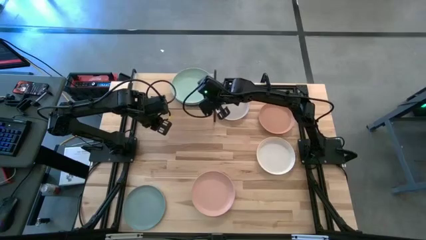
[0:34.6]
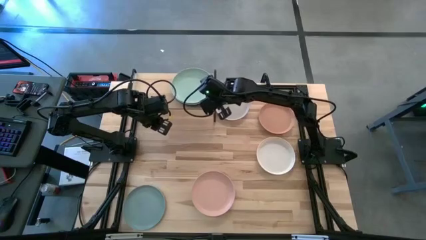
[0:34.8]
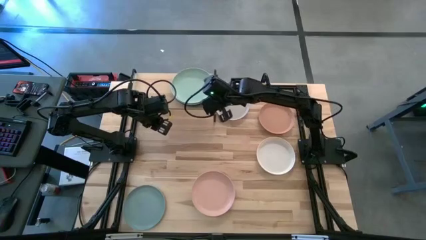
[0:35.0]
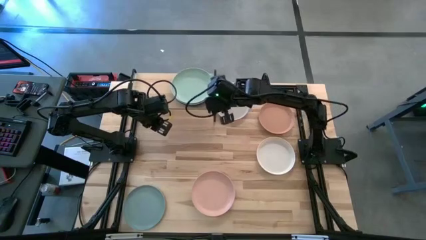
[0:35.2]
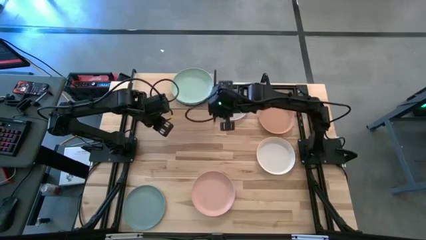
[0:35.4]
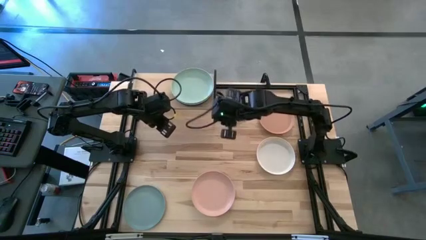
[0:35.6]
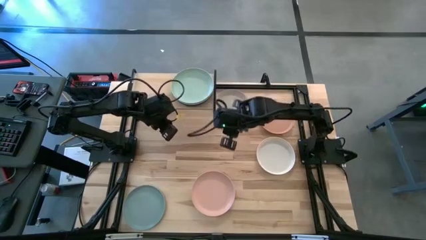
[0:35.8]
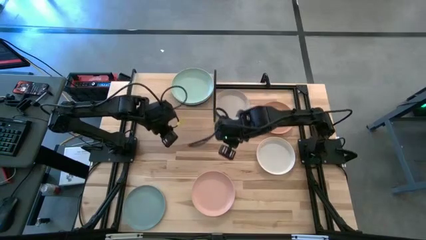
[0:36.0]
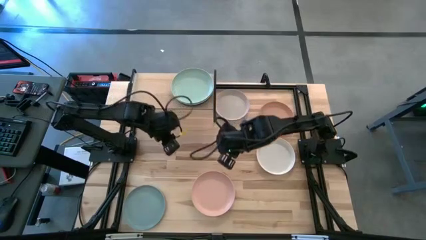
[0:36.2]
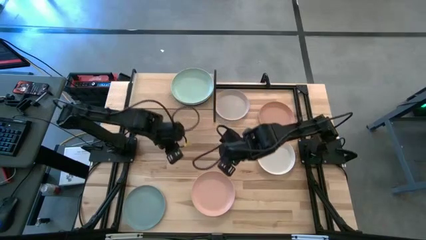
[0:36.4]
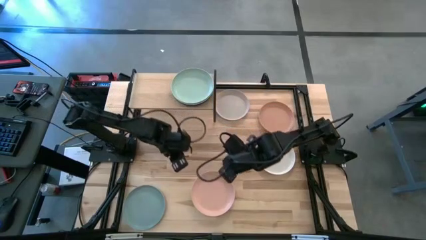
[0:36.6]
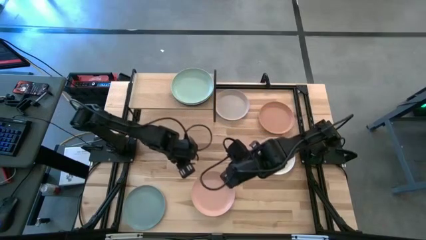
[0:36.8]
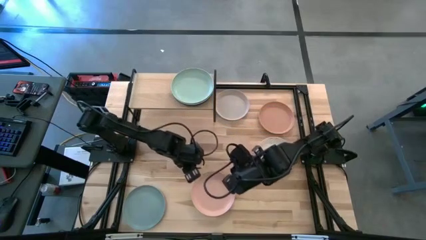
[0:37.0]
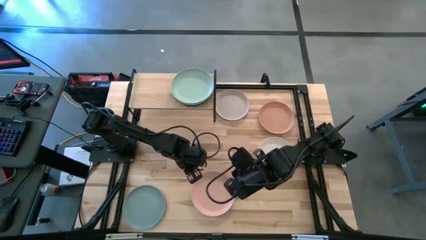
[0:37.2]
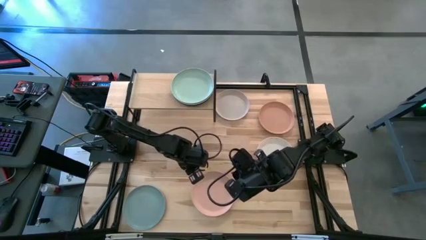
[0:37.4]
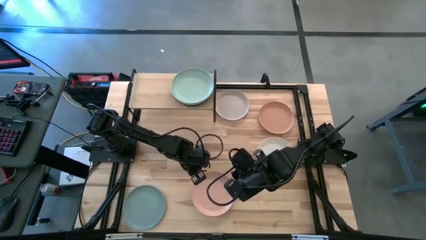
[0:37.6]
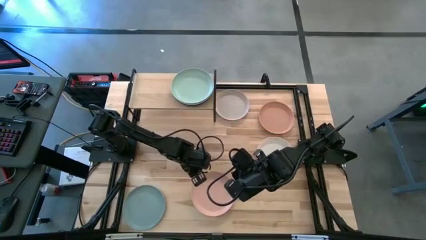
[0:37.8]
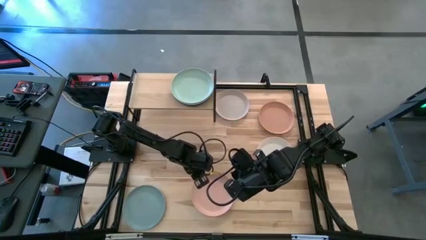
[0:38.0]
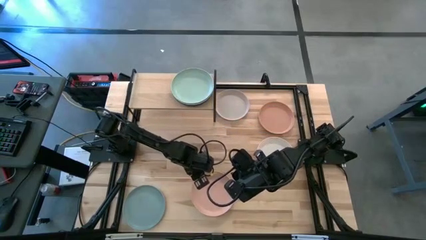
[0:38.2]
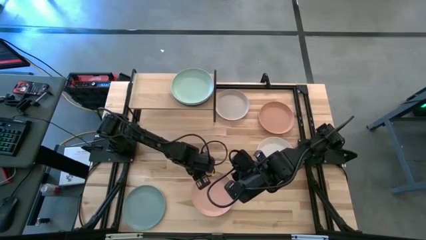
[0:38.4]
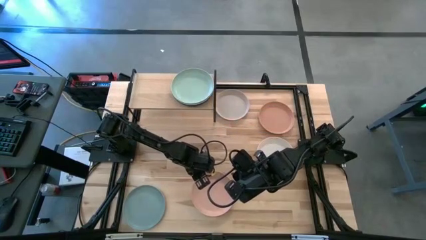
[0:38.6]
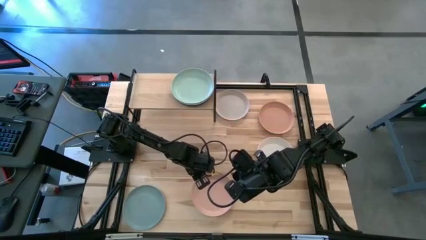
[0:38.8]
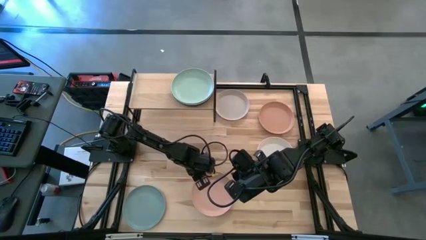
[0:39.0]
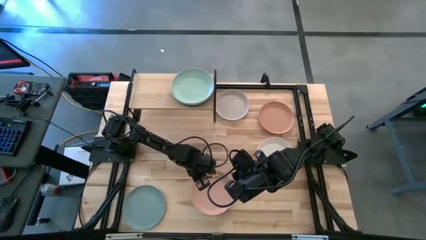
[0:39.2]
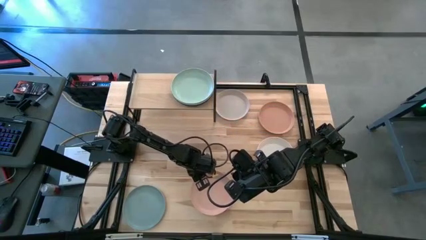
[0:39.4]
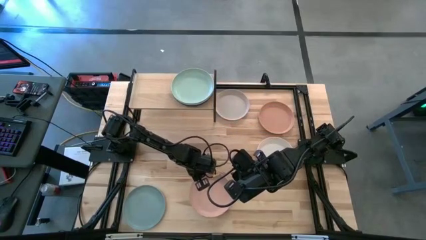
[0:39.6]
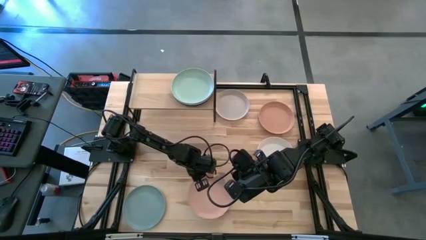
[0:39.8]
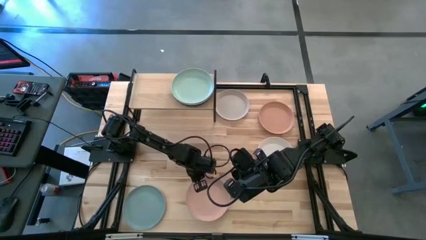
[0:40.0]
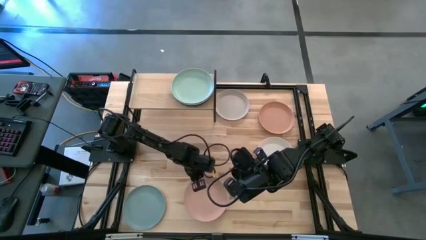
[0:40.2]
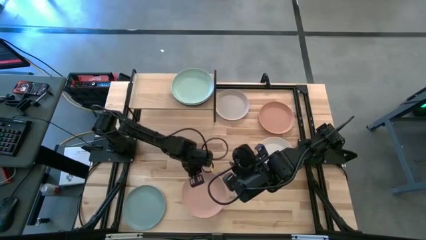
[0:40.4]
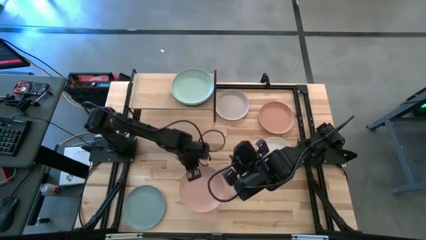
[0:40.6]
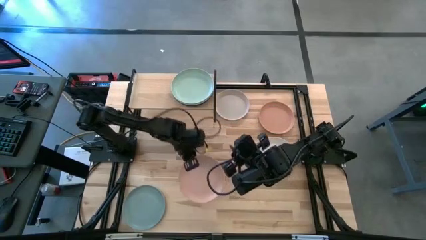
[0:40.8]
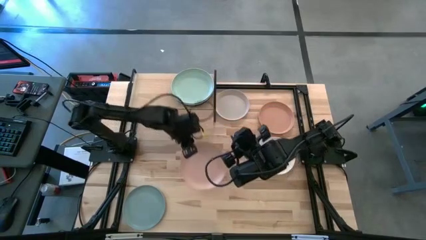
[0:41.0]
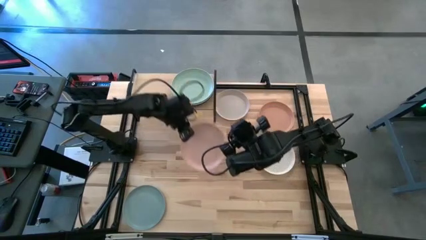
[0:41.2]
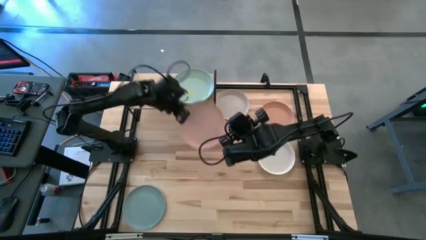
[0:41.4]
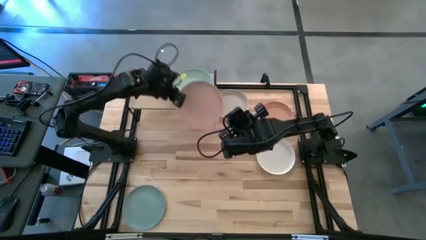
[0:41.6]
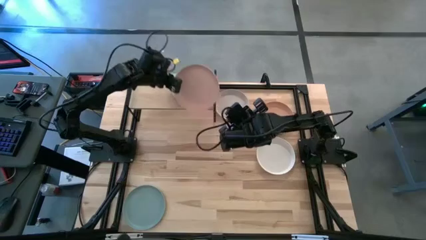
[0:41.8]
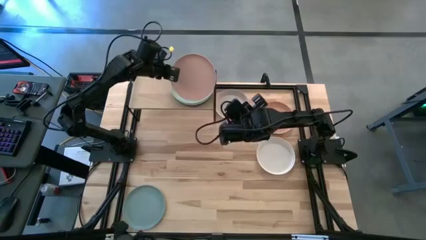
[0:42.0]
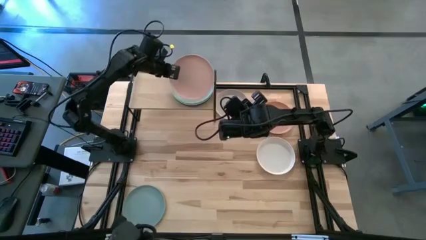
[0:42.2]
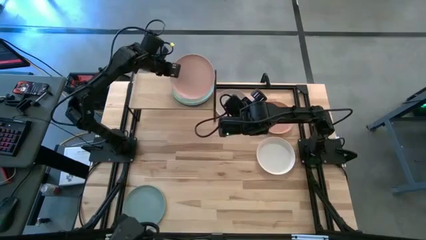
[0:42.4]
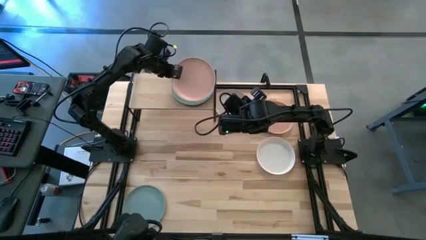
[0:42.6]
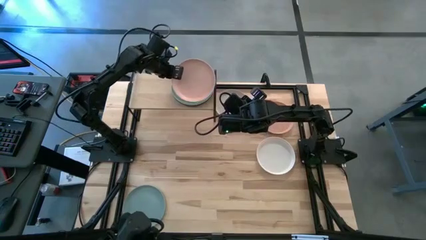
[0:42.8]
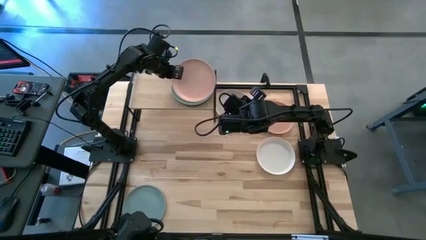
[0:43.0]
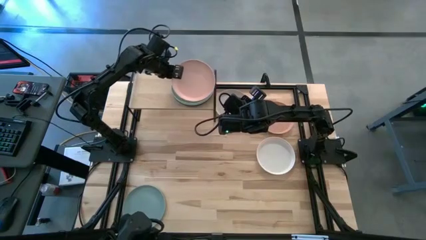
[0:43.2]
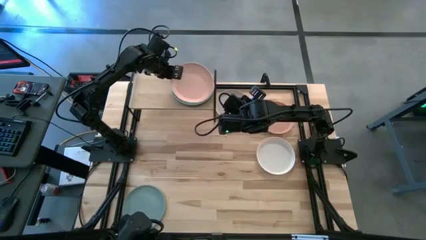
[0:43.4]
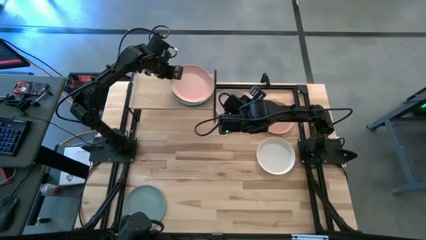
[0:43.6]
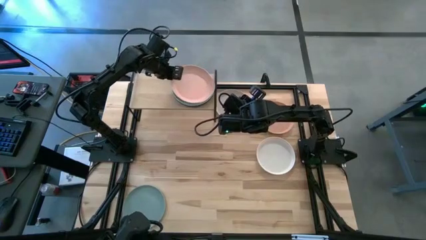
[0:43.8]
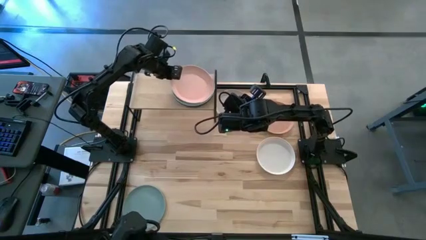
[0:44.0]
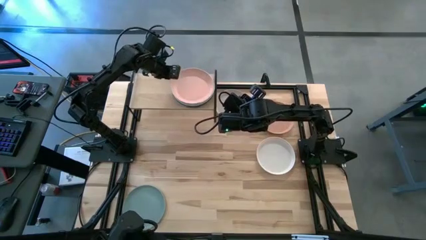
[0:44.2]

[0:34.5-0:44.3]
Task: Place and stack plates onto a shelf
Stack the bottom pink plate on top of the light green plate on the shelf

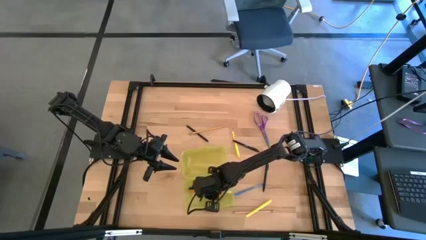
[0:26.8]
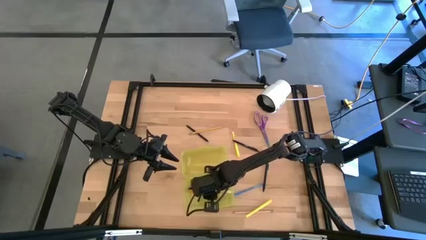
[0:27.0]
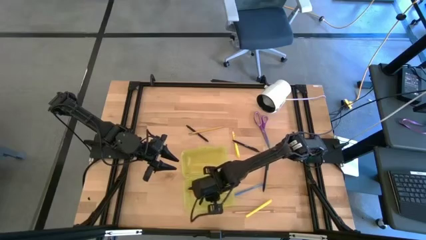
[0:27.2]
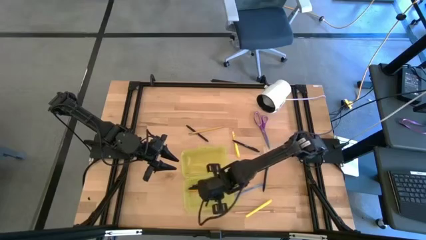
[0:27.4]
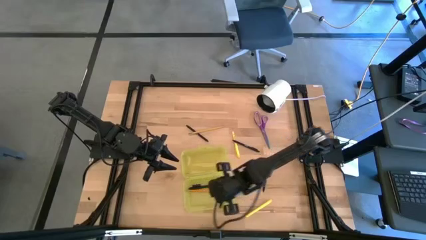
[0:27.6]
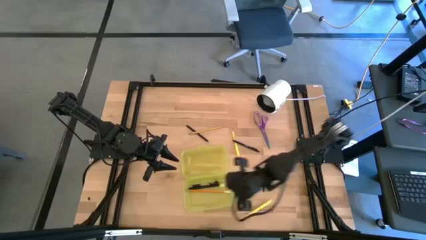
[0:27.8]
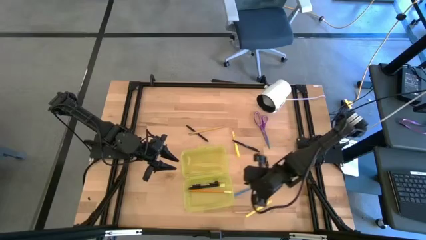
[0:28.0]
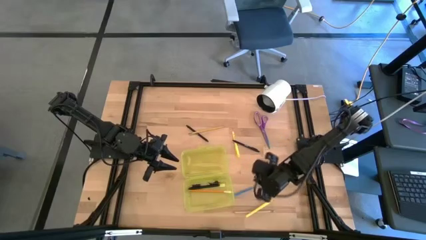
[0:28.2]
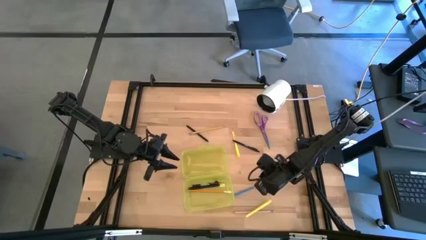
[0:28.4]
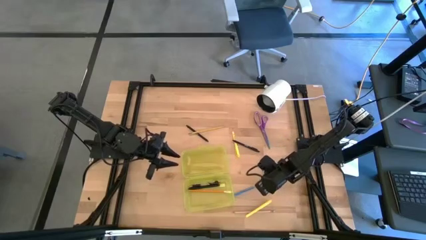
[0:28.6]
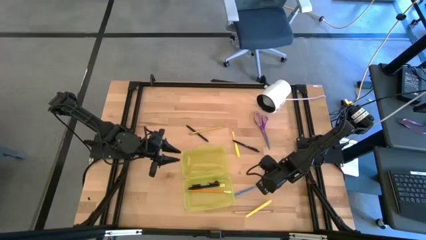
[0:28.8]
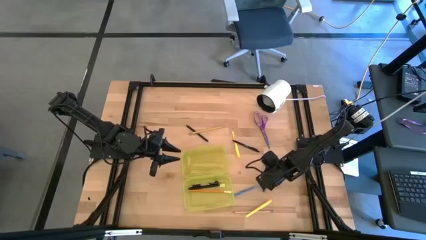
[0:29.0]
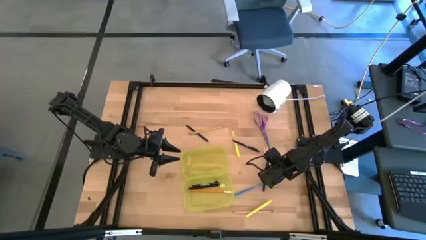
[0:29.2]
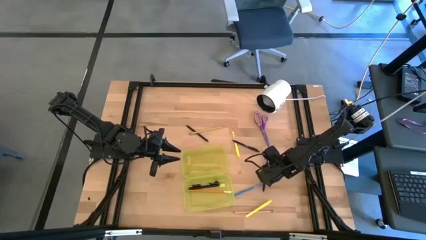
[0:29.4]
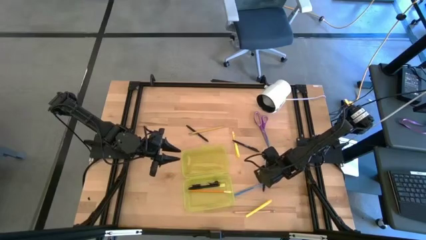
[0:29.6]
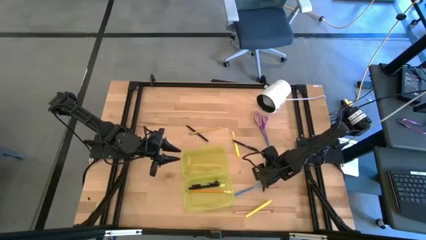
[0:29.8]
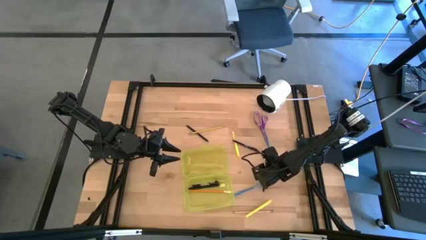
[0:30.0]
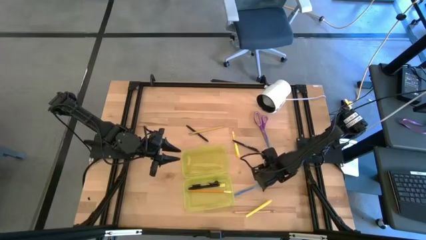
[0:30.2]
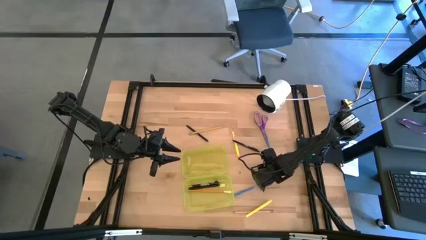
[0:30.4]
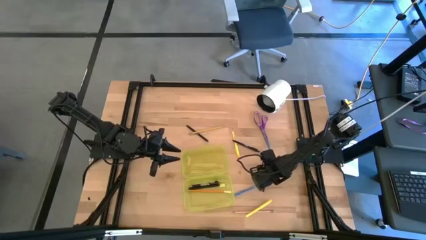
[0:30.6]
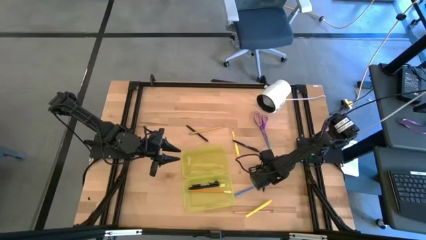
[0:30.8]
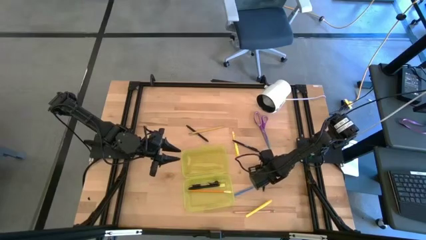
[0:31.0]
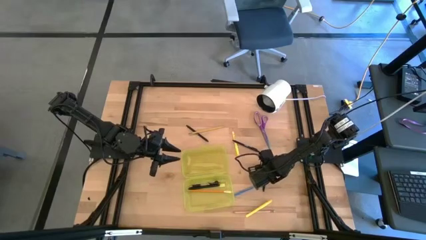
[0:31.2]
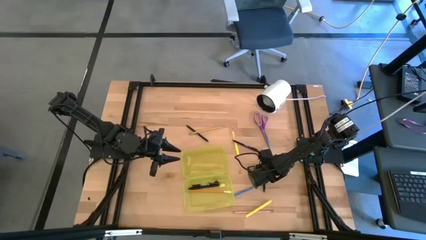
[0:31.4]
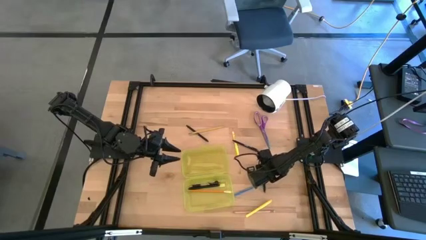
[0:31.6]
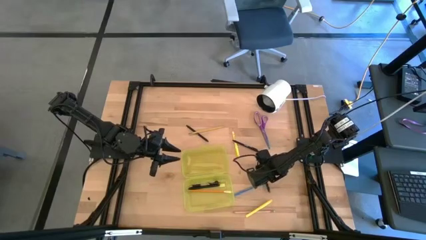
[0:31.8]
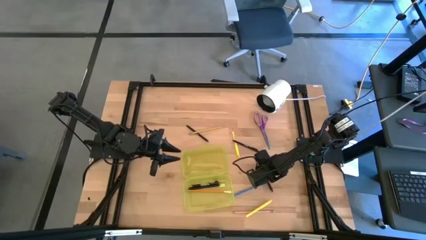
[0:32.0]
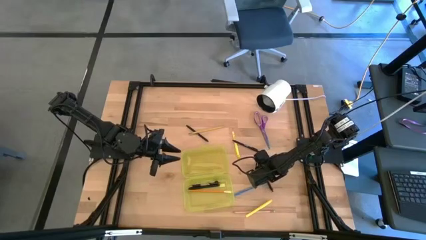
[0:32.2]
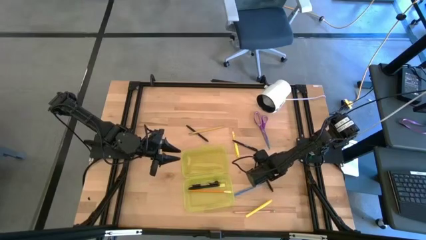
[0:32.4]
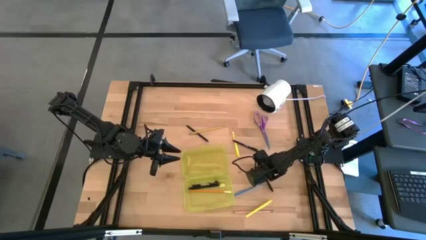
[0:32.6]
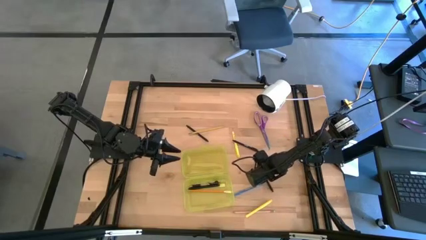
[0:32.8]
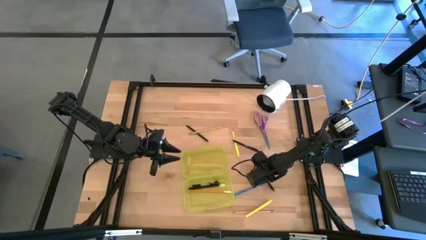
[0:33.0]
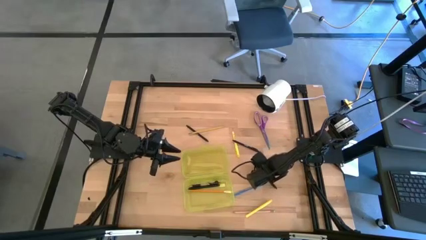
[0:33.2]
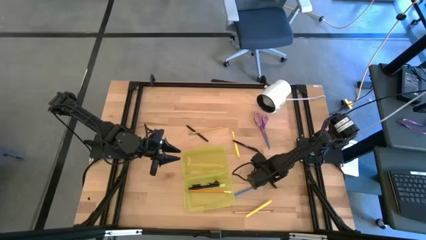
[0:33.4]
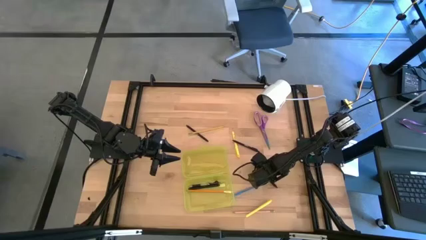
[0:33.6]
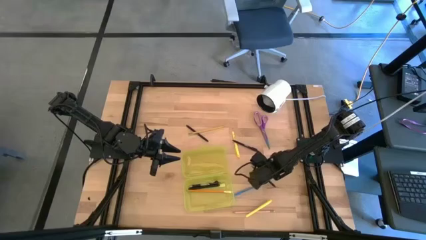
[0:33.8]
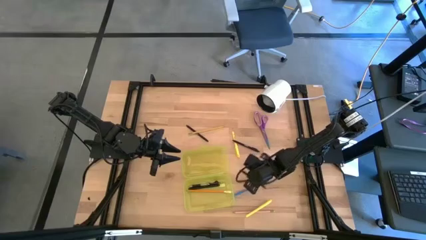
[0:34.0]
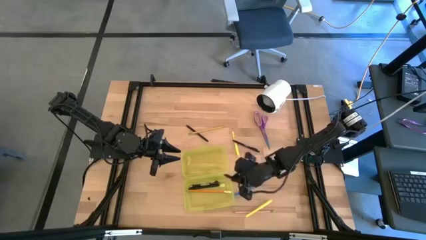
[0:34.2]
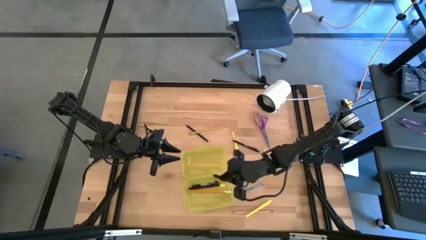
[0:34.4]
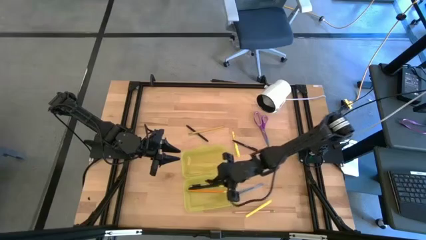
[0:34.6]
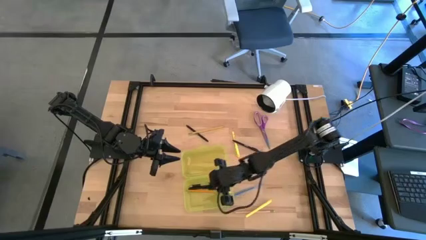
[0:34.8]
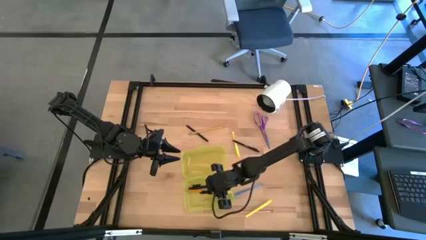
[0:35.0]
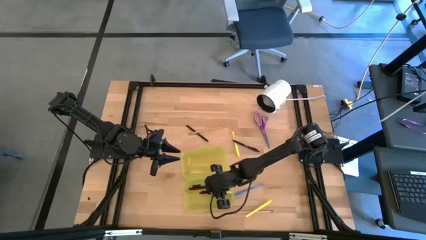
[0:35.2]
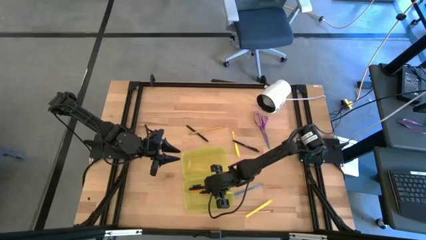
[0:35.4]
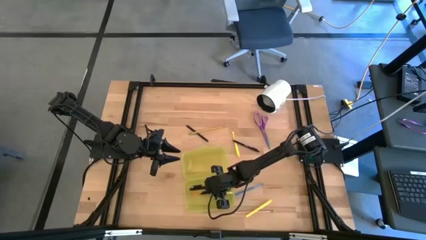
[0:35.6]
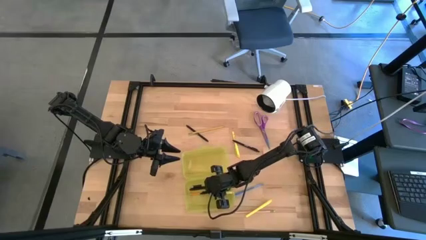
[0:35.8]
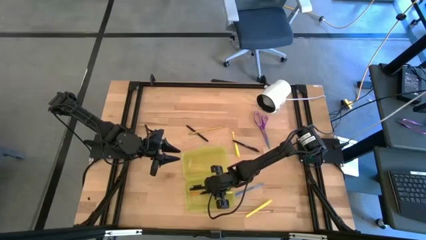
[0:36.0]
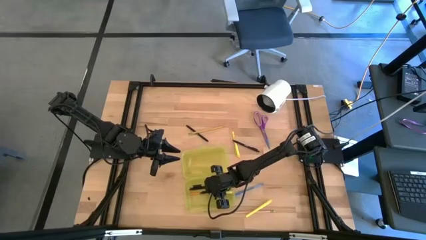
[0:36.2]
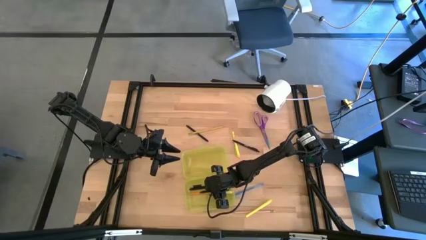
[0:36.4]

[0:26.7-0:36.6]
Task: Pick & place school supplies into a supply box
Put the black pen into the yellow supplies box
